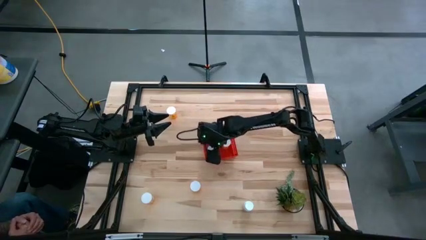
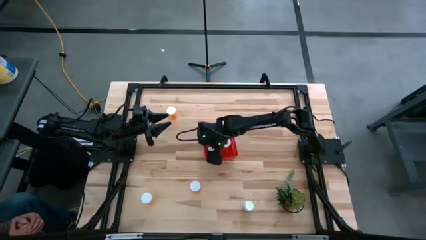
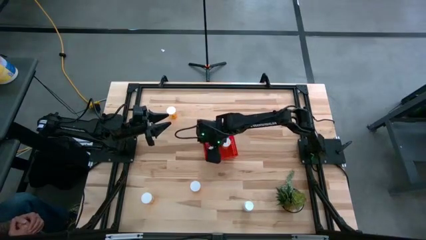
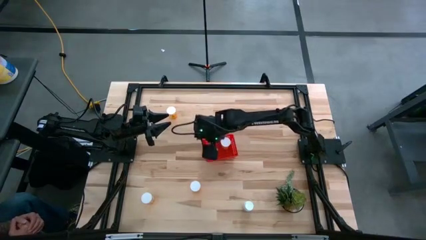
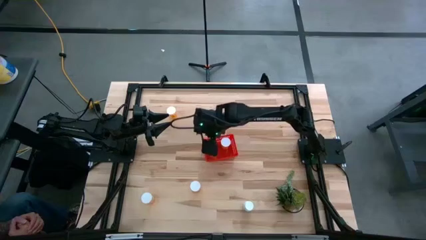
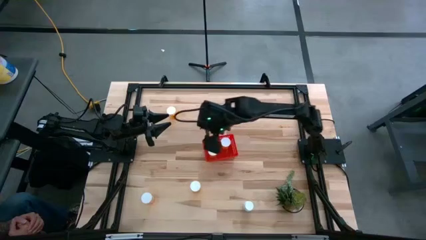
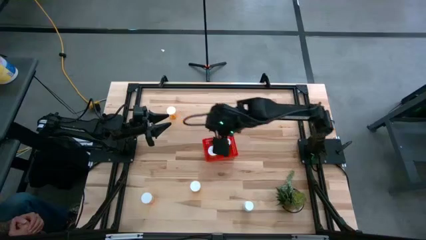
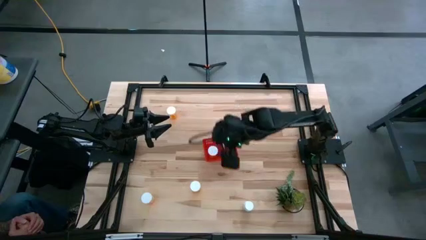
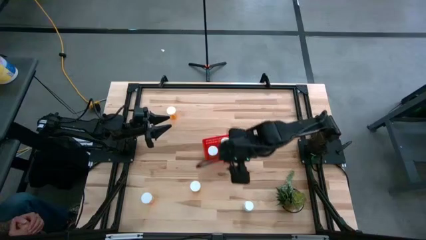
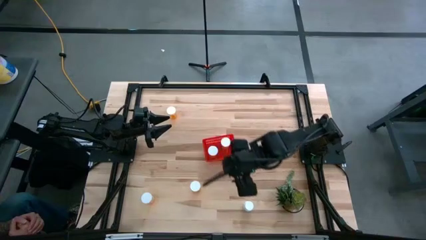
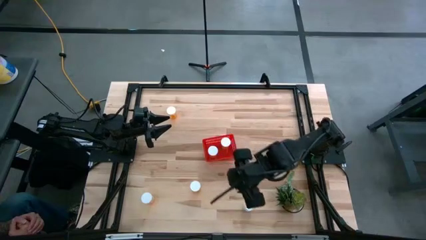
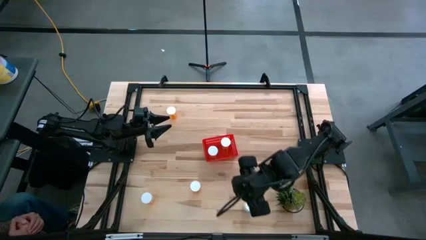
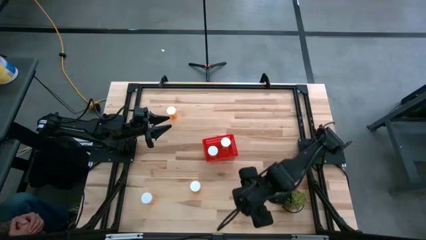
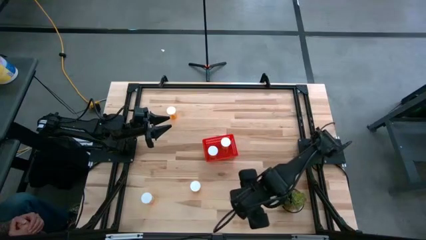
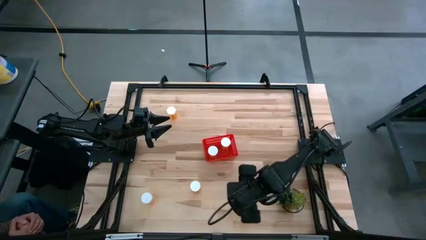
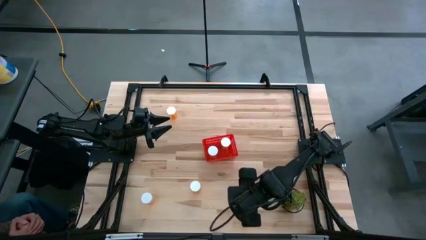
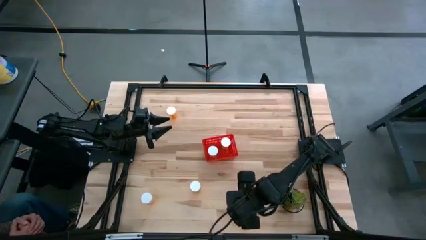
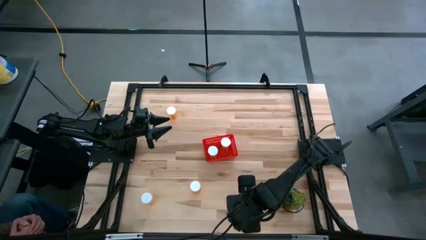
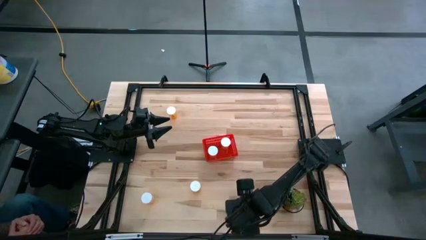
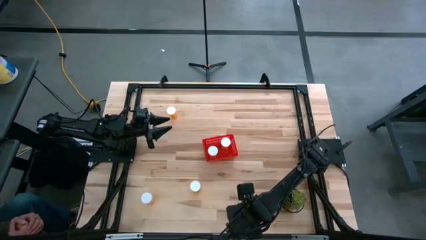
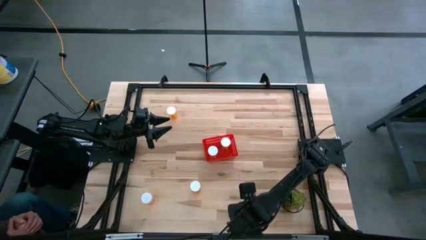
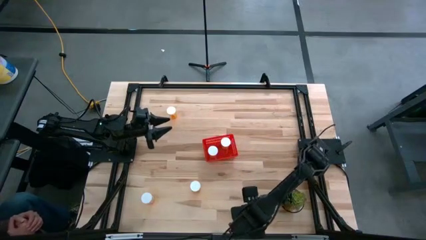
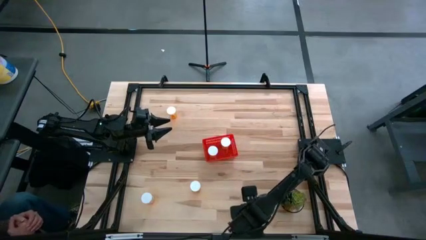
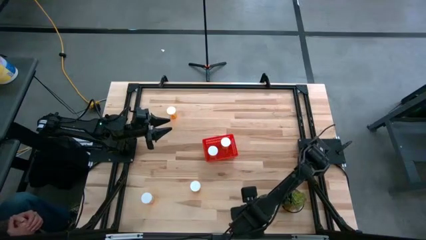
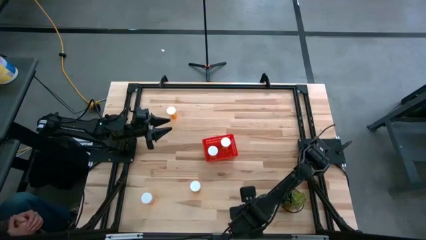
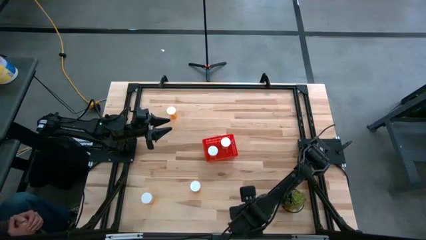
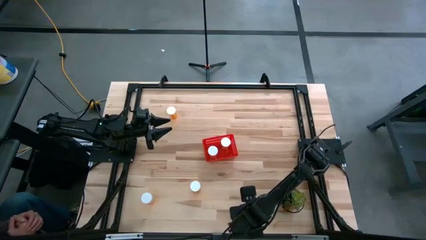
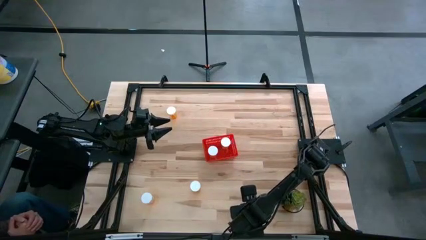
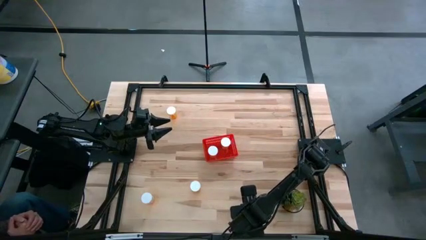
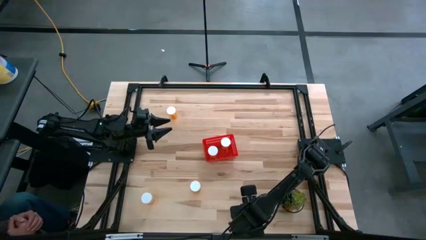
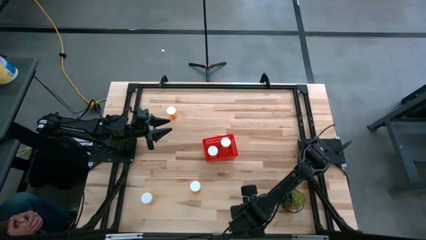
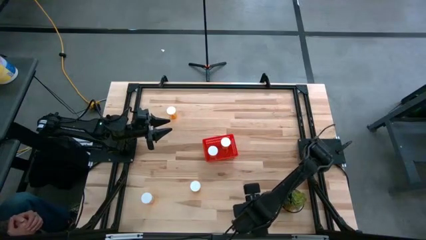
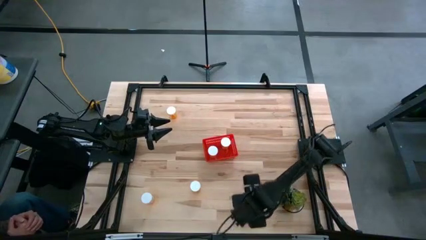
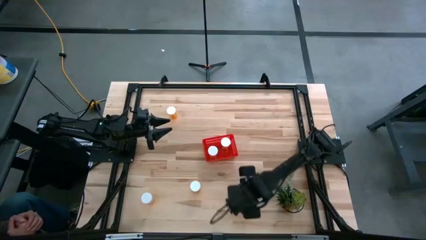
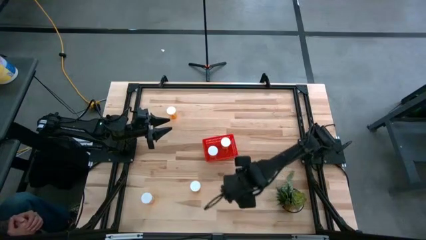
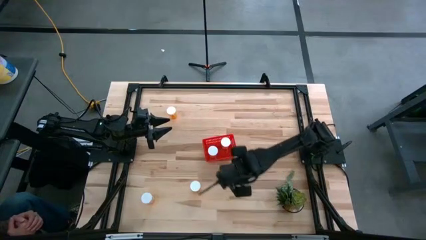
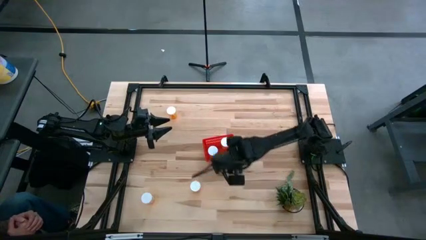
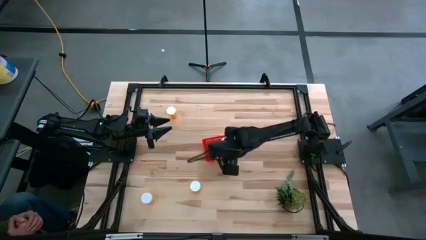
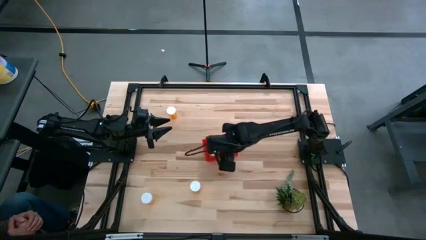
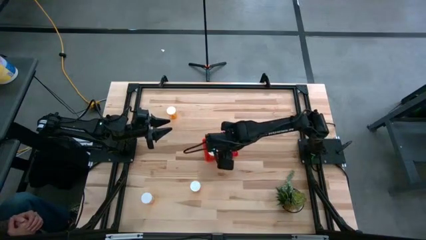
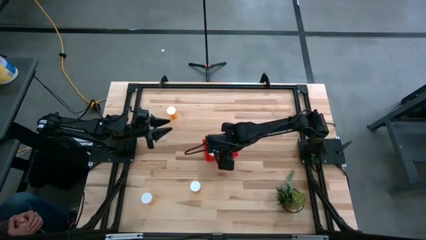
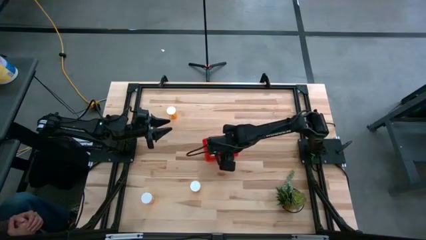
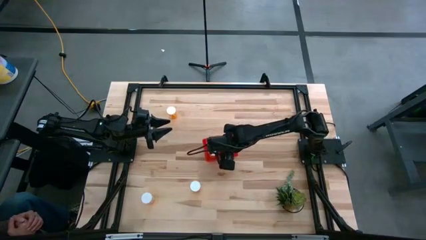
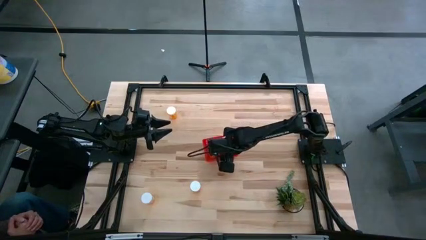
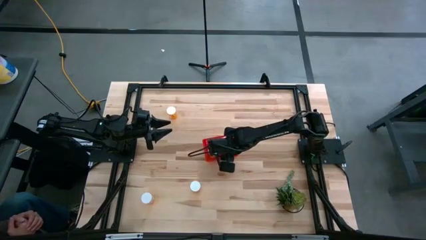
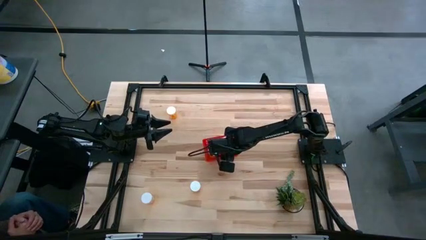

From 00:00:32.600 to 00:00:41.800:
Task: Pick and place pill bottles into a basket
Put the white medicine bottle into the bin
